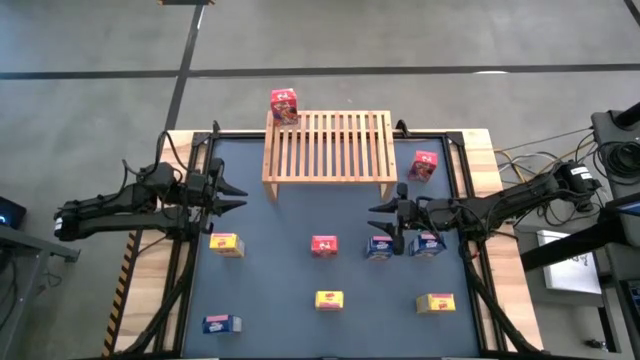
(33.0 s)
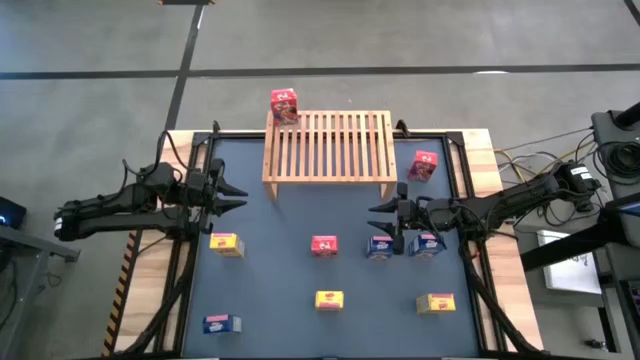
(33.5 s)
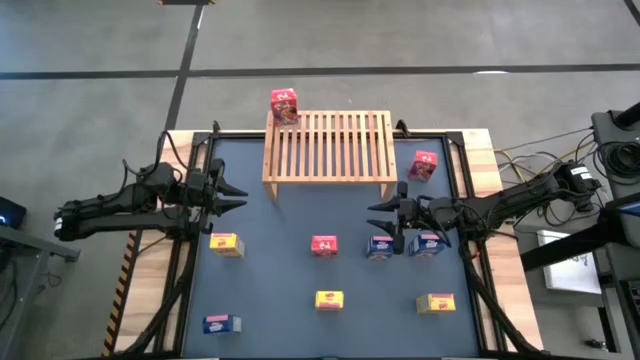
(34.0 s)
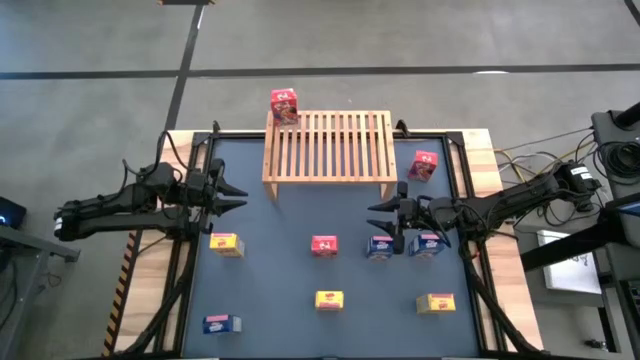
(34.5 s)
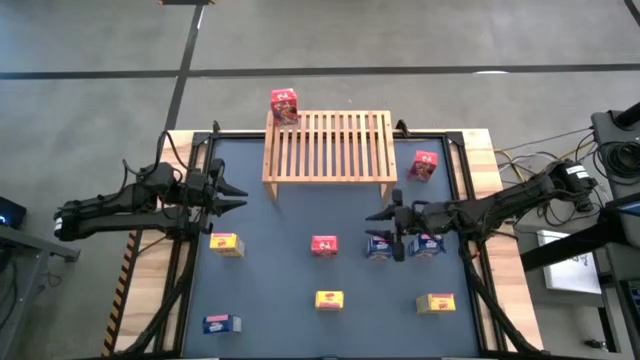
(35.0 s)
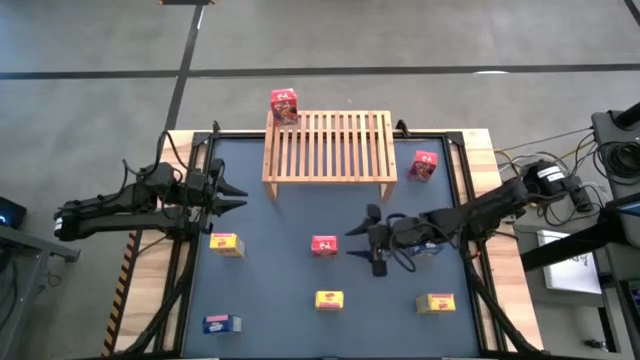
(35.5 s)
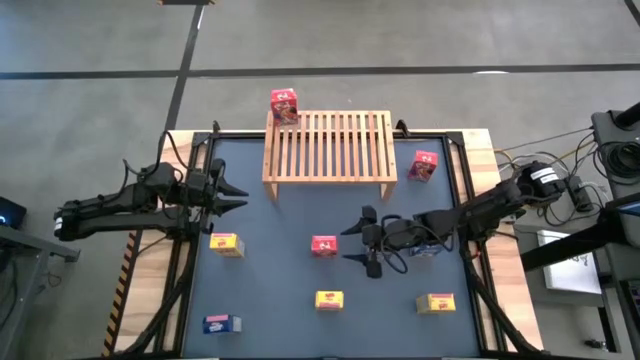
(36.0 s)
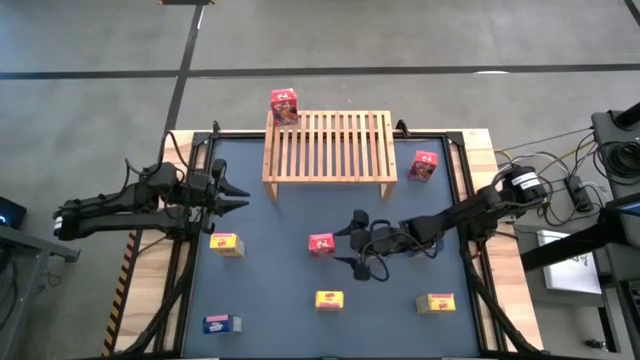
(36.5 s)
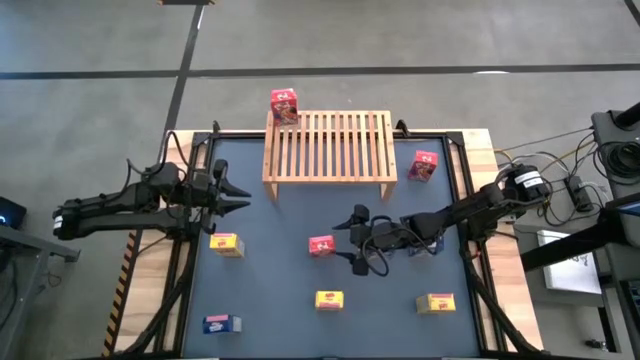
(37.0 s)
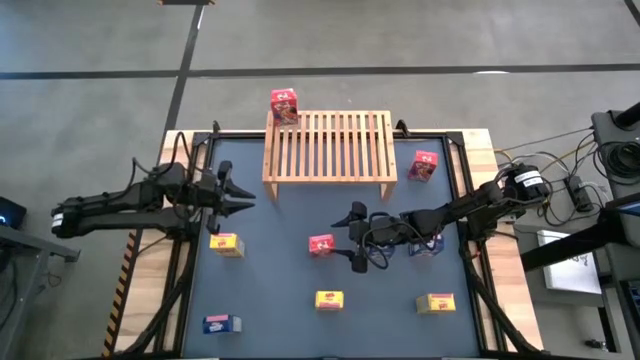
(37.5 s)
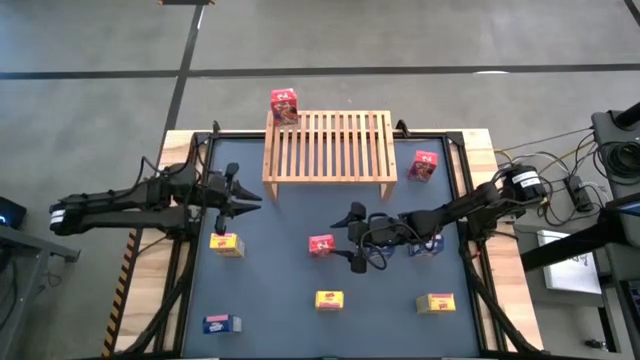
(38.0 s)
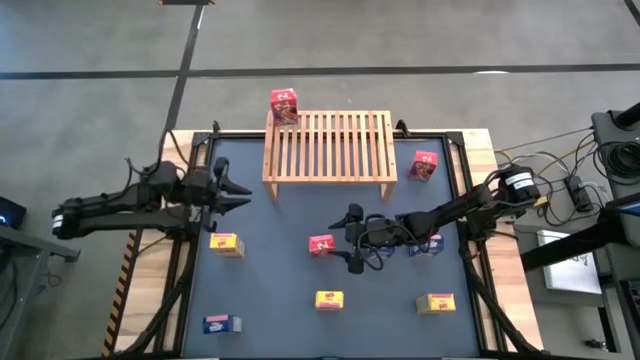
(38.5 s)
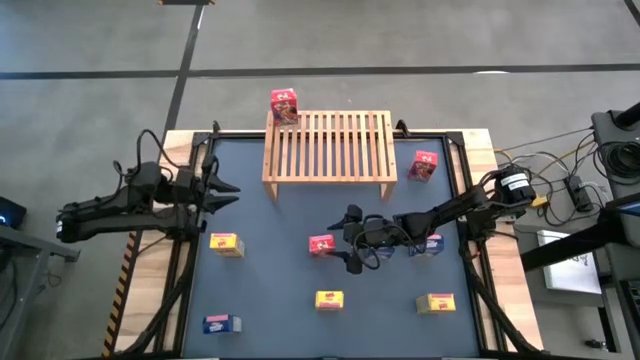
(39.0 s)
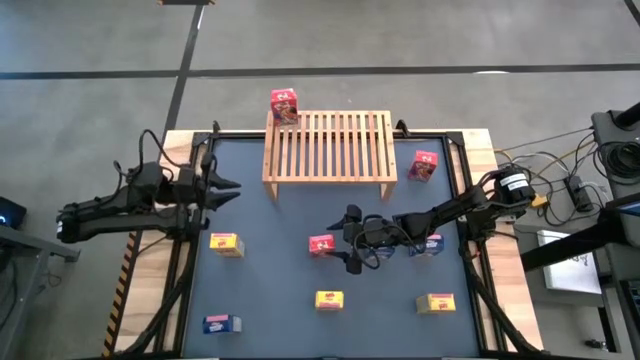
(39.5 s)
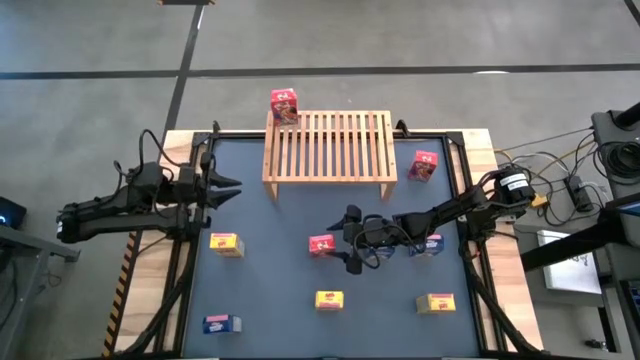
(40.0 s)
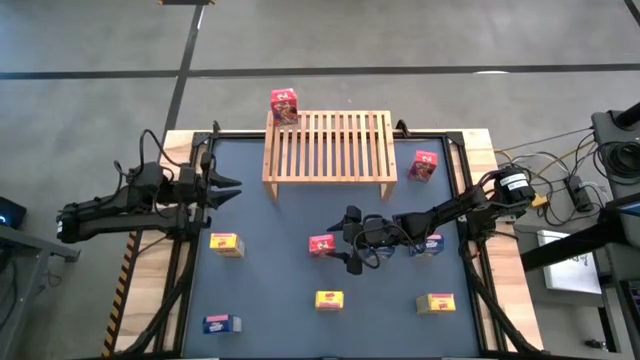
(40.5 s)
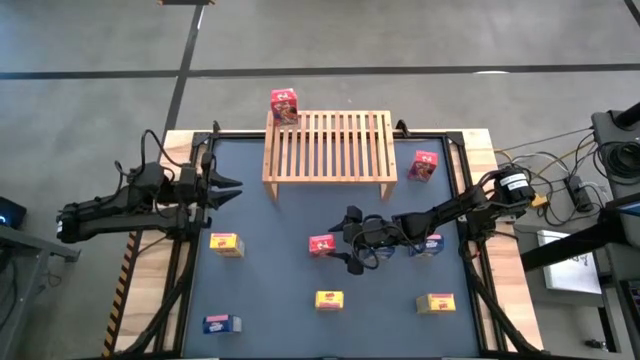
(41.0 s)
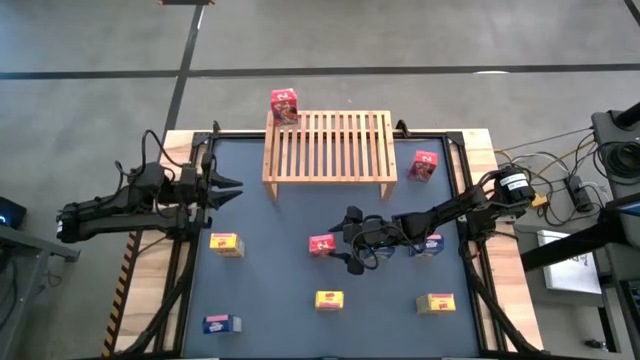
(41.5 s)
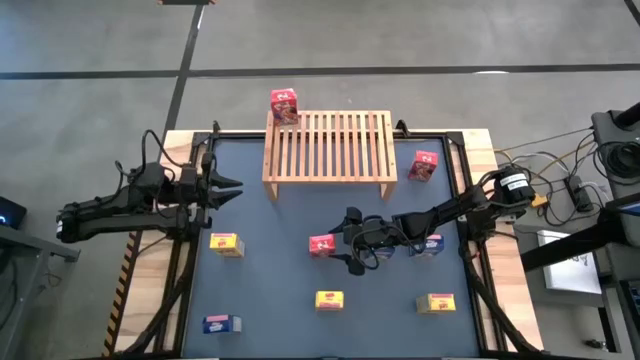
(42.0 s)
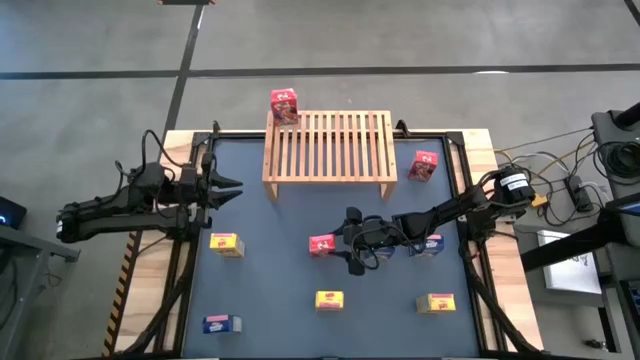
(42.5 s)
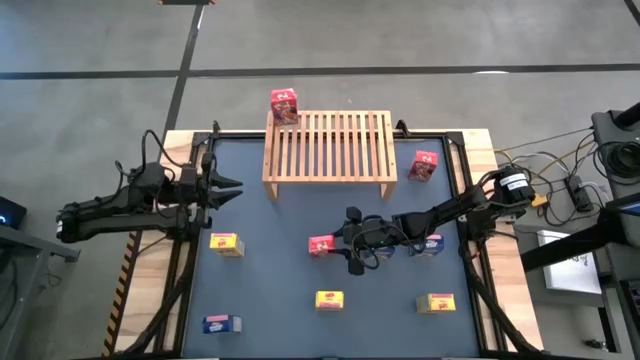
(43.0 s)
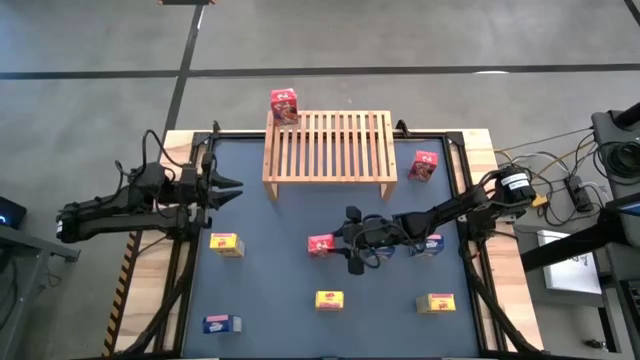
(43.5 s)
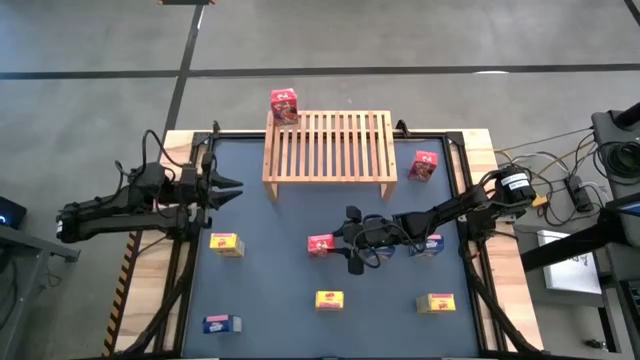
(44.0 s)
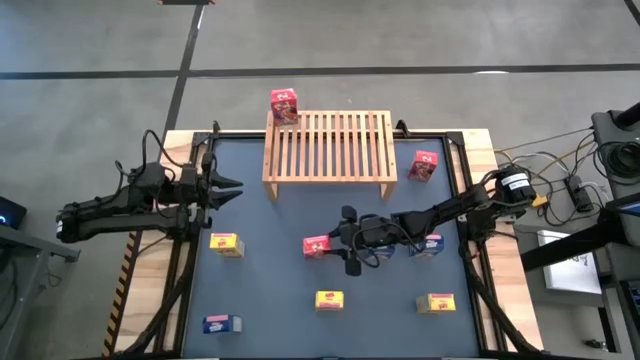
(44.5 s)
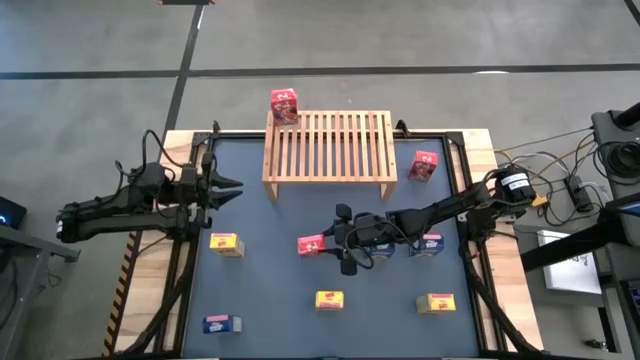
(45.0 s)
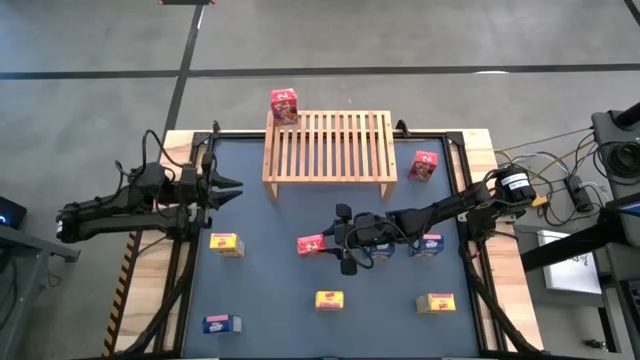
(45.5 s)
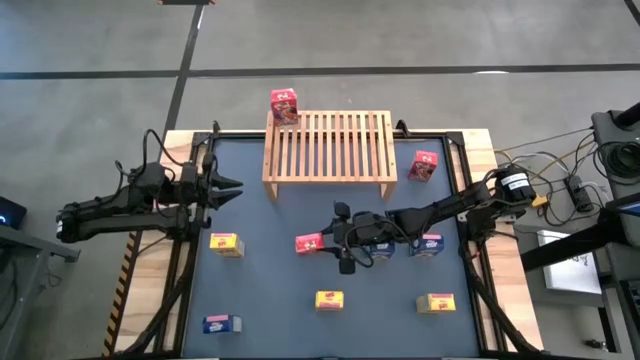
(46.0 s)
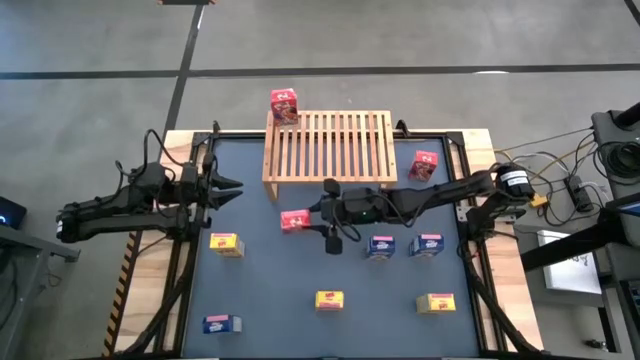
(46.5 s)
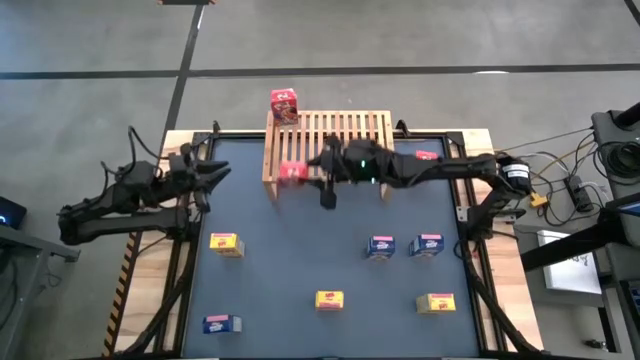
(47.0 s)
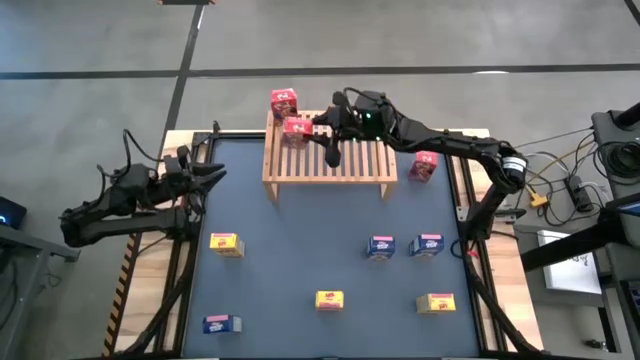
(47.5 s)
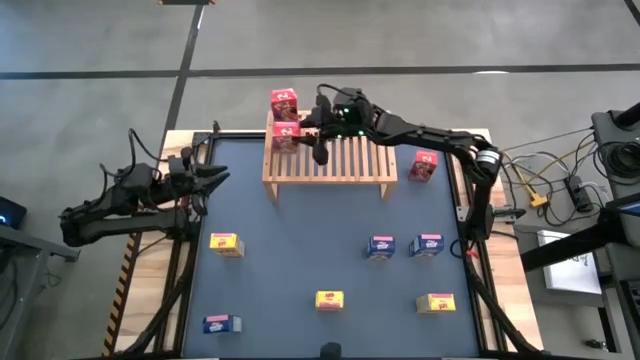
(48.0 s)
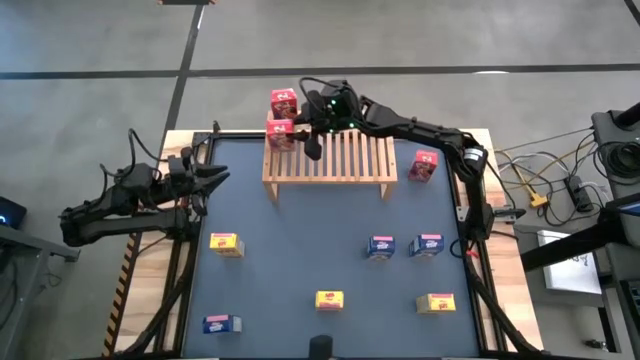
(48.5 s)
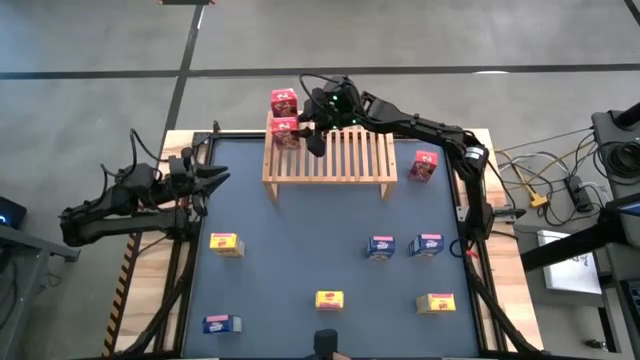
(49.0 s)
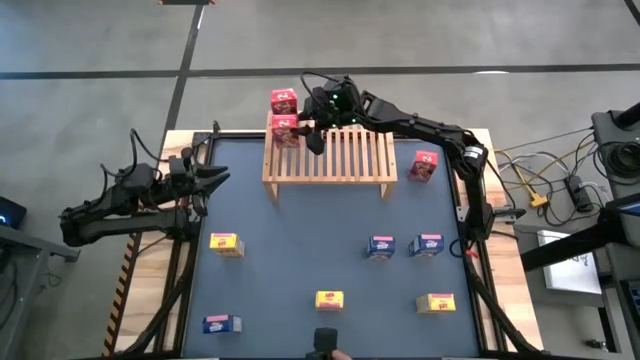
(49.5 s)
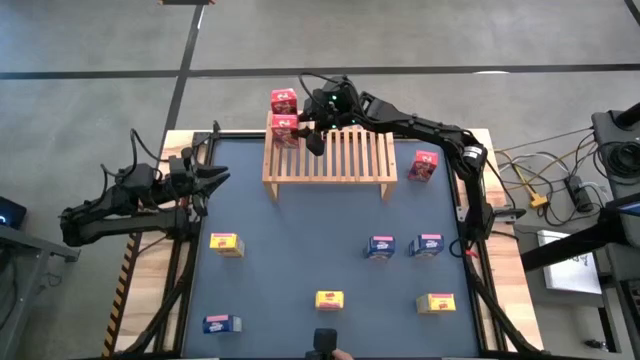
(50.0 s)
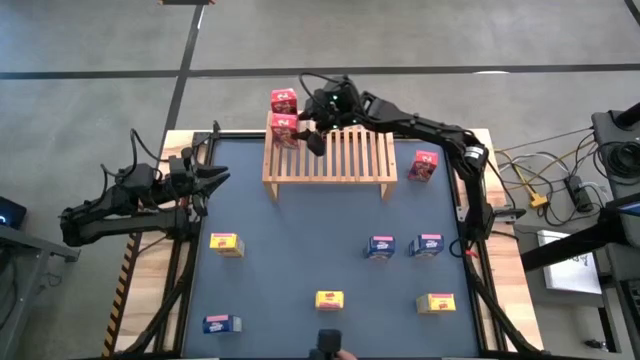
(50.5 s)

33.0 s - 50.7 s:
Task: Stack cereal on shelf
Put the bottom red cereal box aligned with the other red cereal box on the shelf
